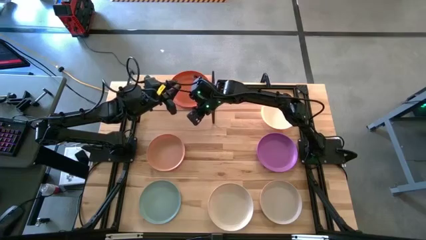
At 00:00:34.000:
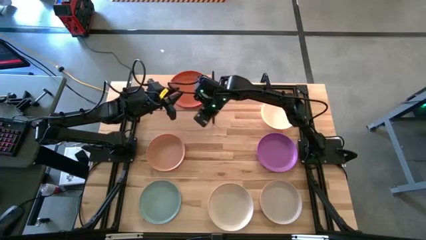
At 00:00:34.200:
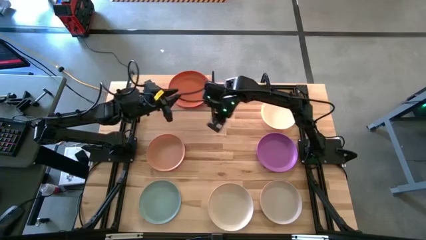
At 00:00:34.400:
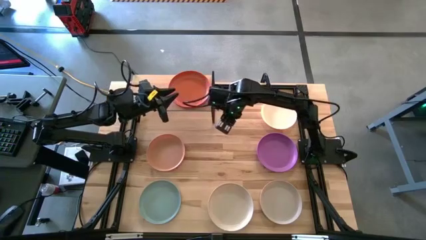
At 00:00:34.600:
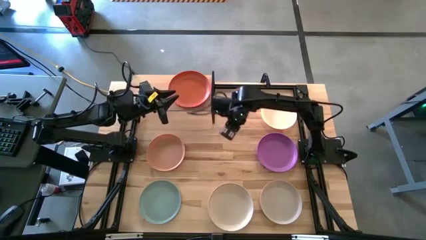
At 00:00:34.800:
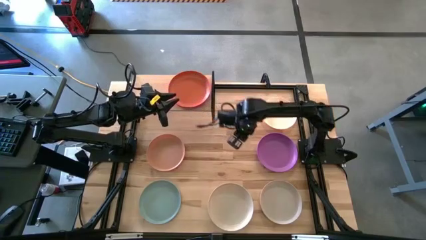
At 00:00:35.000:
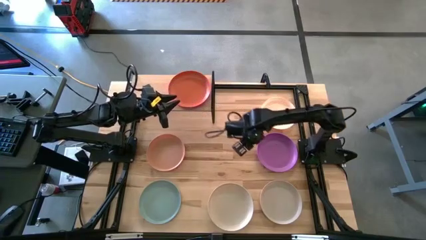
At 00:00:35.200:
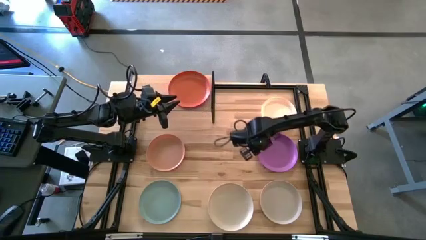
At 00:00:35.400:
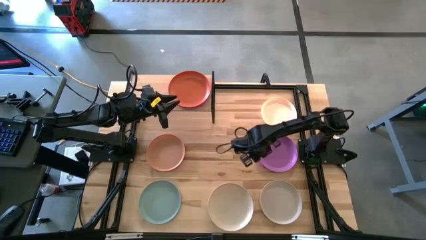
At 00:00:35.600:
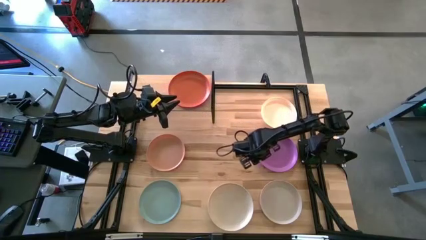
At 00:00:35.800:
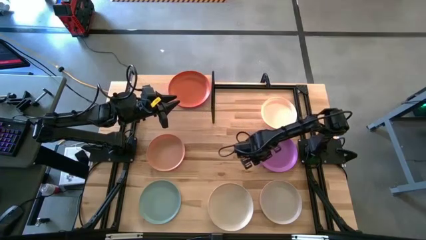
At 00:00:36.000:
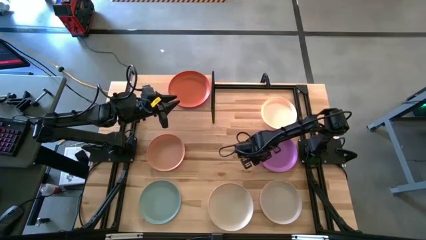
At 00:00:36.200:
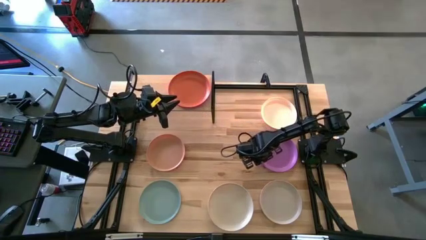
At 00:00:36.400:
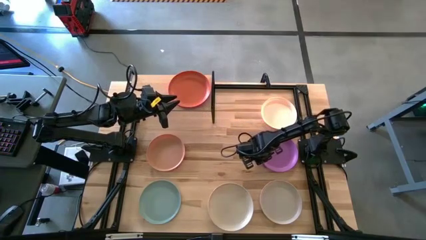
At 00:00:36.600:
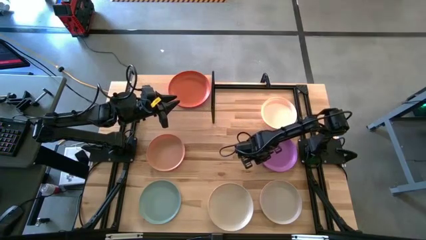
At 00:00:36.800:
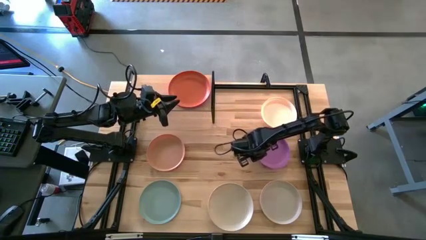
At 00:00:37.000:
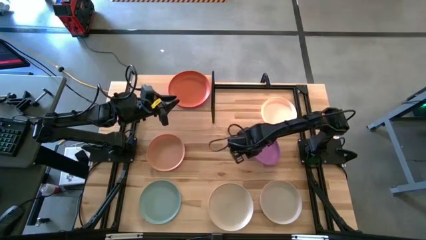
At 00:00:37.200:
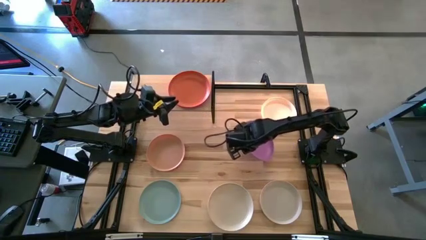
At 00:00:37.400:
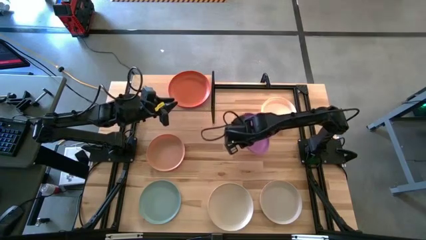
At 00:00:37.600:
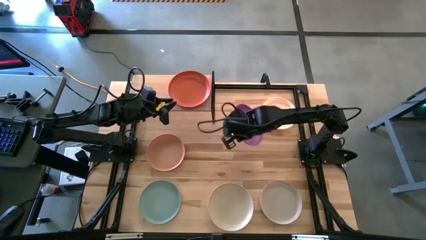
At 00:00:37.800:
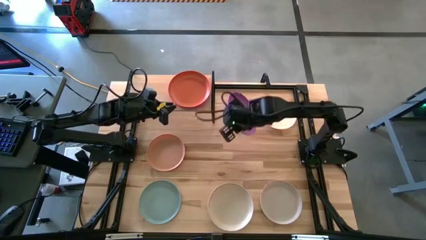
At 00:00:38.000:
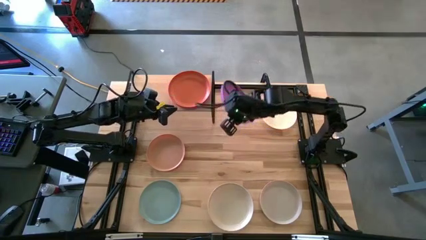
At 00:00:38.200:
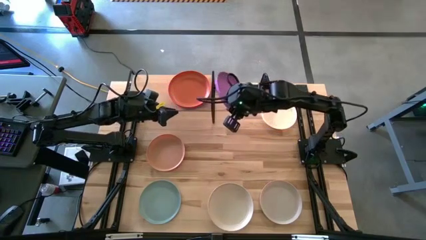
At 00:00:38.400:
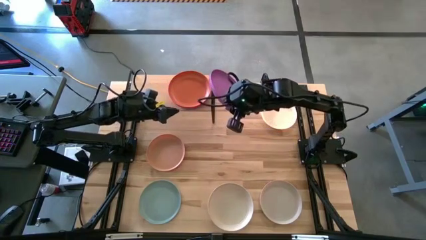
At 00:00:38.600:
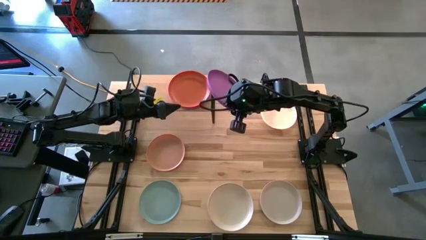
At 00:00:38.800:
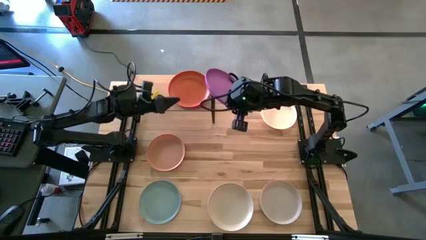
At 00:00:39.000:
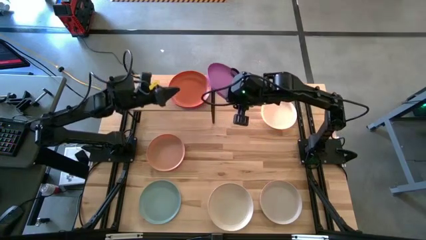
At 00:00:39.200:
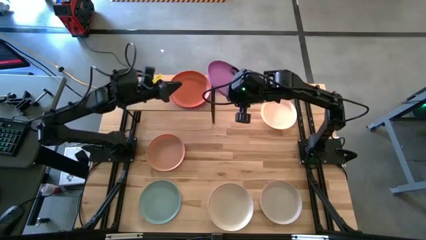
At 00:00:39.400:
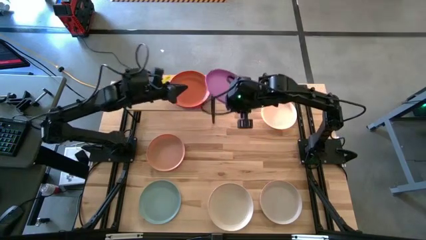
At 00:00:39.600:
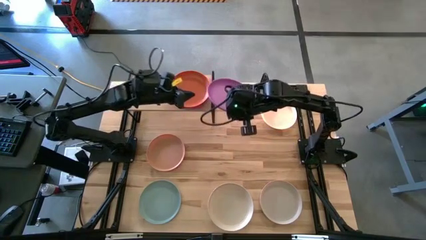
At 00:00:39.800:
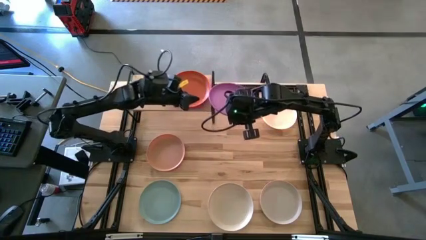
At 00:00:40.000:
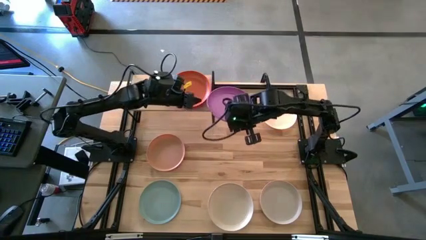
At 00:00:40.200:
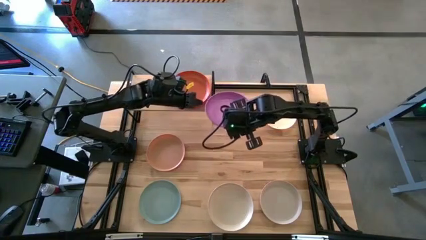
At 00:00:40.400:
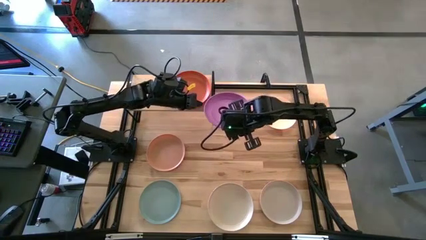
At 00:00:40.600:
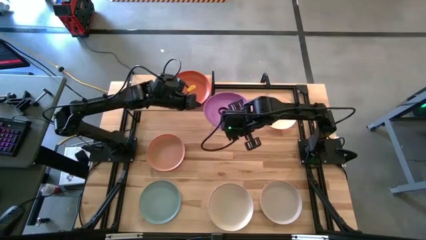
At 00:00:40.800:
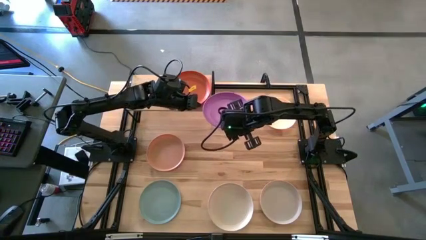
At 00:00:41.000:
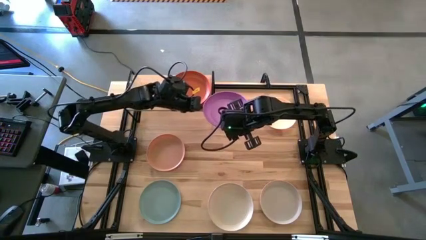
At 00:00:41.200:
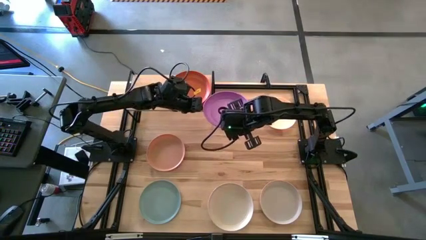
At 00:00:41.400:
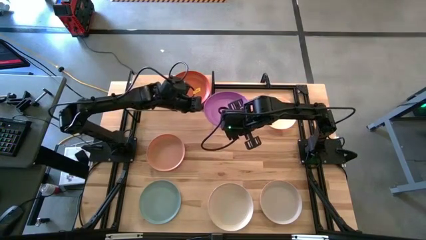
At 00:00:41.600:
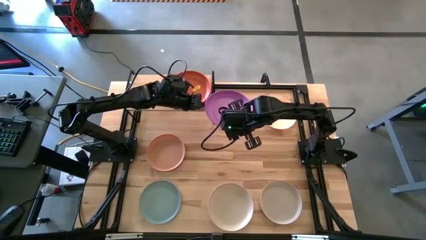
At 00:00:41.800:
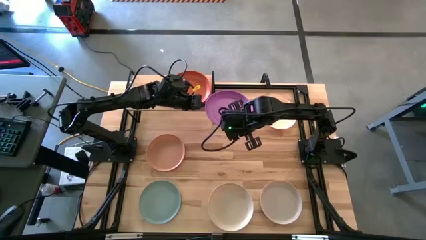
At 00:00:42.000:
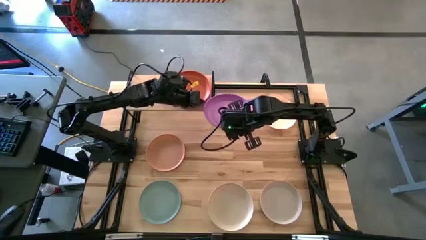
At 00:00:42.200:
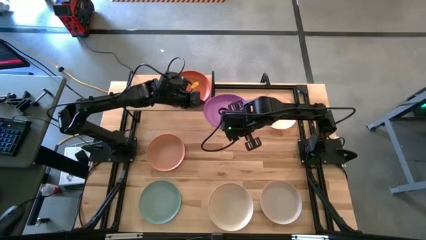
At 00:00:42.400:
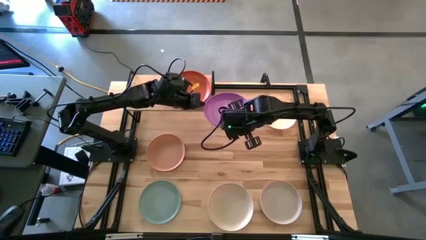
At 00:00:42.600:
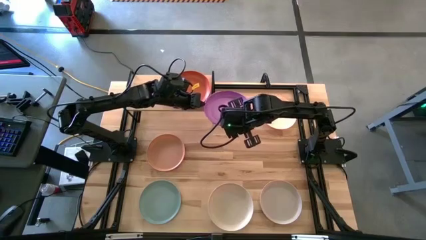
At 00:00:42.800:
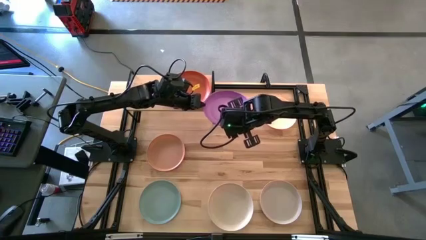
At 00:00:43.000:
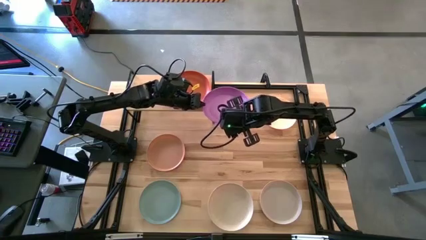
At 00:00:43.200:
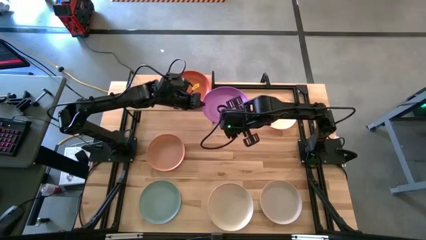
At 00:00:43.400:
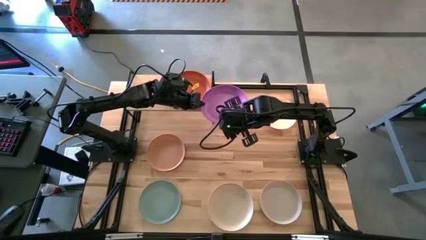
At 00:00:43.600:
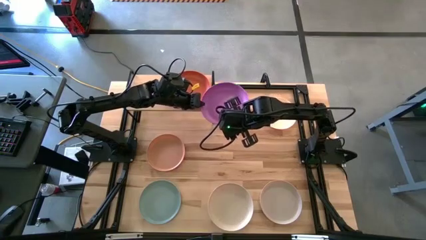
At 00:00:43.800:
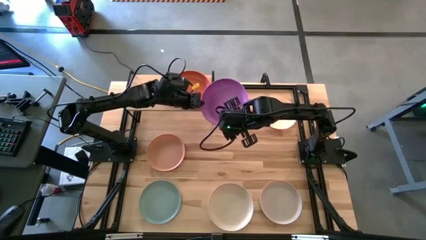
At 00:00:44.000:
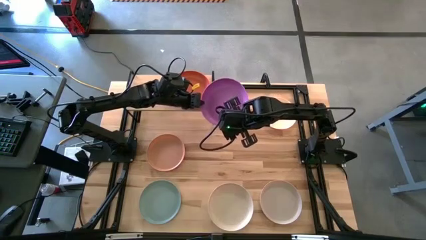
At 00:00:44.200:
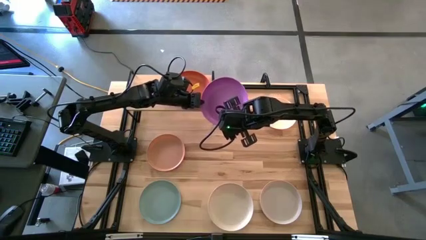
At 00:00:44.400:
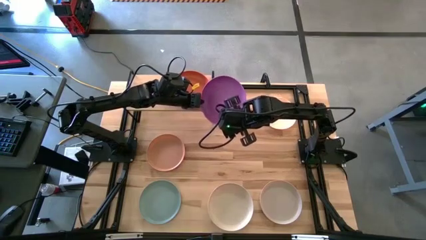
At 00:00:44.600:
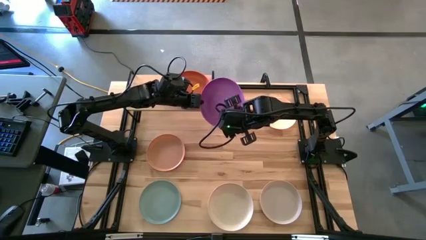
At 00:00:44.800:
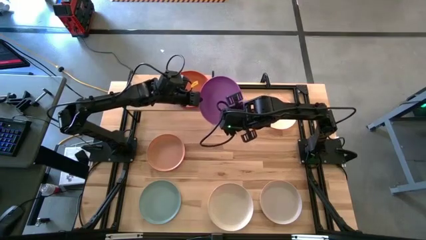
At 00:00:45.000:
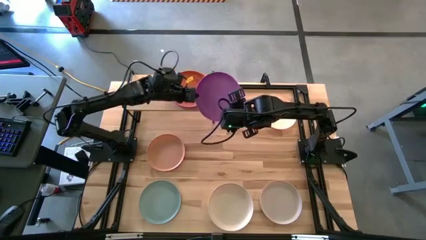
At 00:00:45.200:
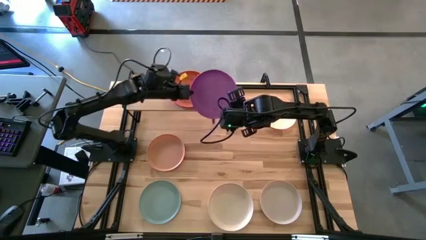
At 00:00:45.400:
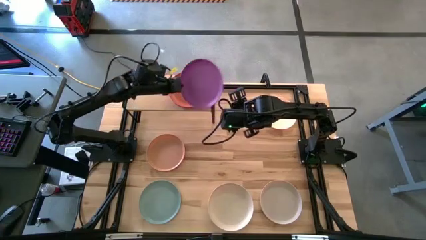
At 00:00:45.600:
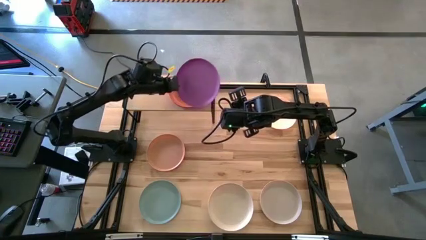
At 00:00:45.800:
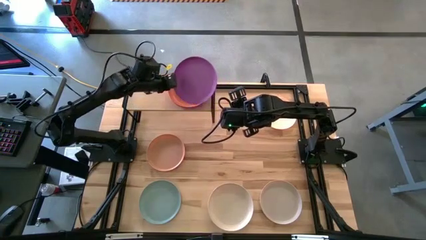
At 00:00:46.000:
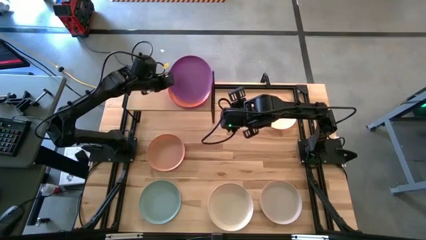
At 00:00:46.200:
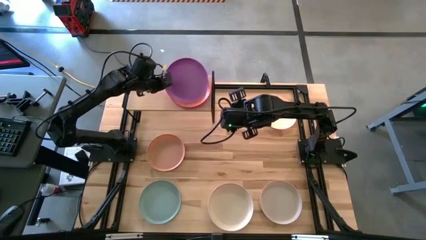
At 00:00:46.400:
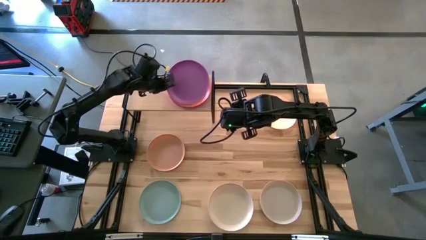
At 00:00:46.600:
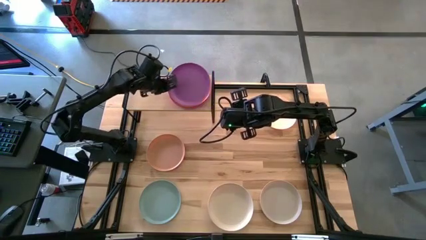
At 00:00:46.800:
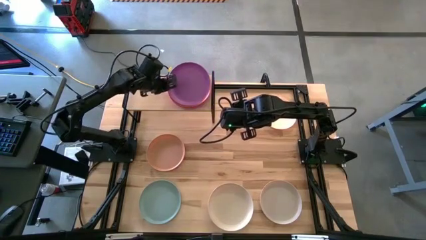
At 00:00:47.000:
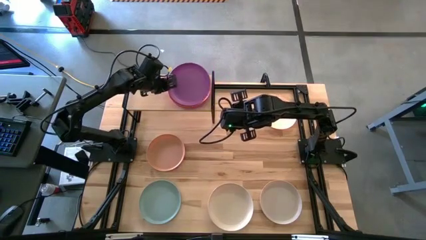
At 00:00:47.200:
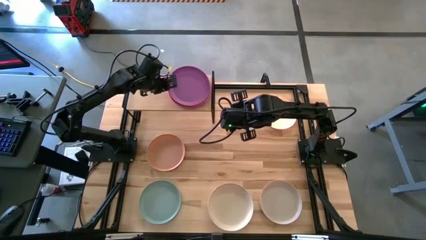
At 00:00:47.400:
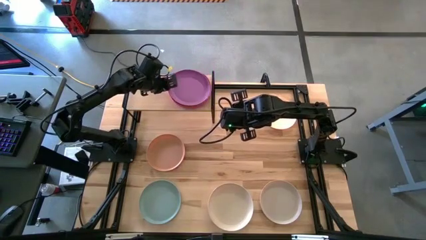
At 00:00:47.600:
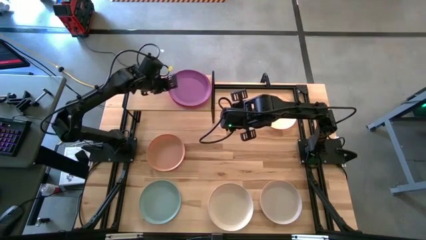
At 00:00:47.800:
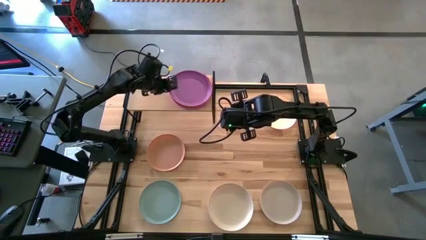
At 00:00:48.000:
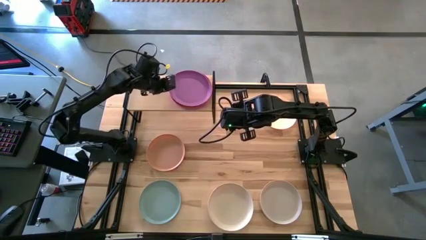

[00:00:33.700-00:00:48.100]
Task: Place and stack plates onto a shelf
Stack the purple plate on top of the orange plate
